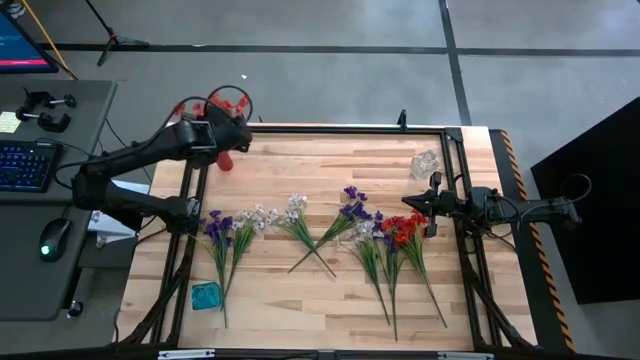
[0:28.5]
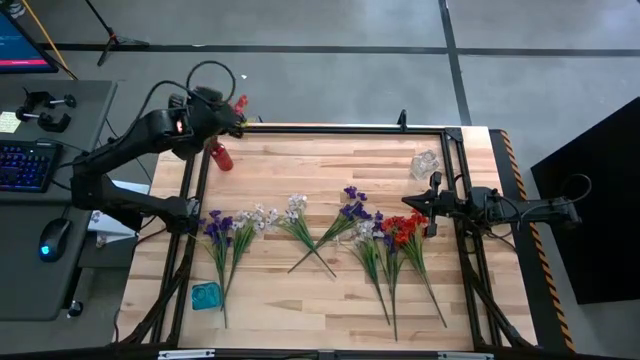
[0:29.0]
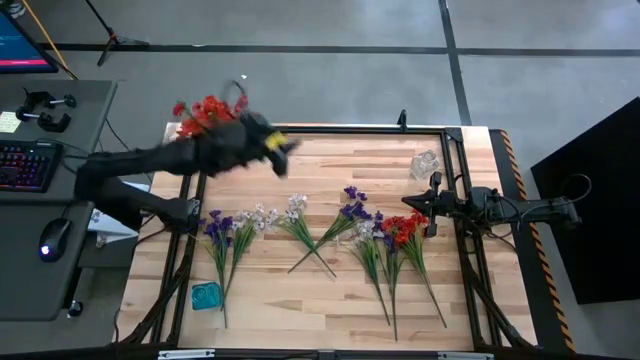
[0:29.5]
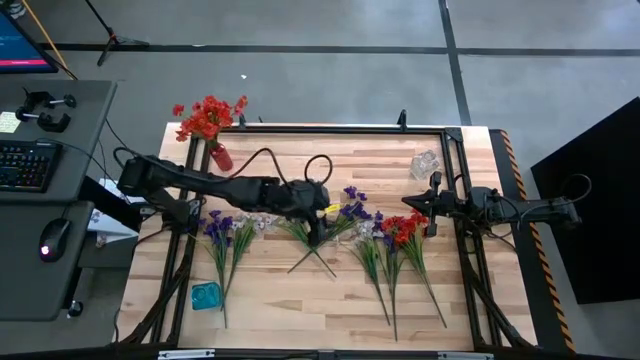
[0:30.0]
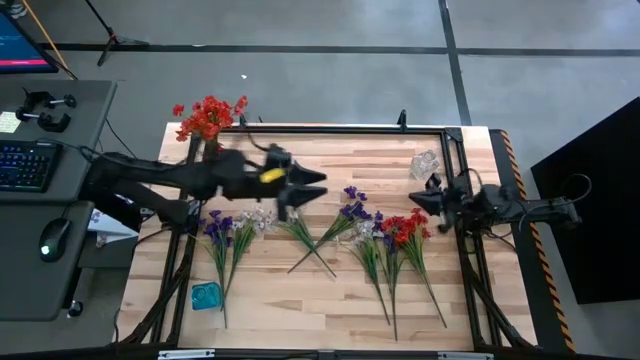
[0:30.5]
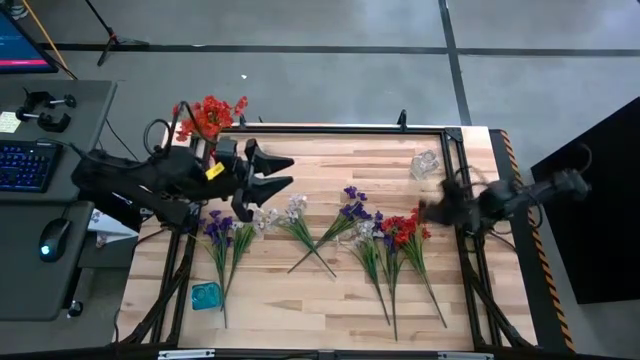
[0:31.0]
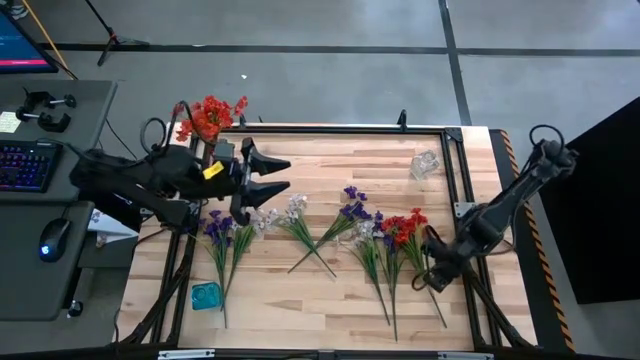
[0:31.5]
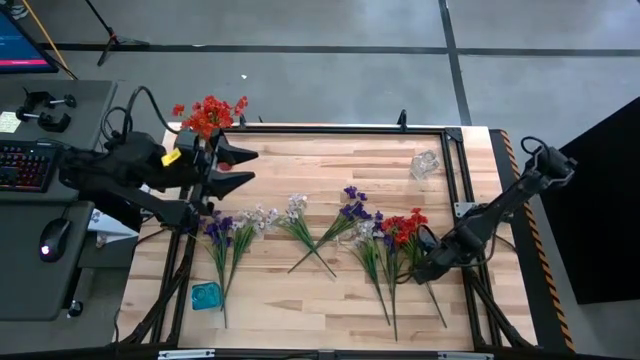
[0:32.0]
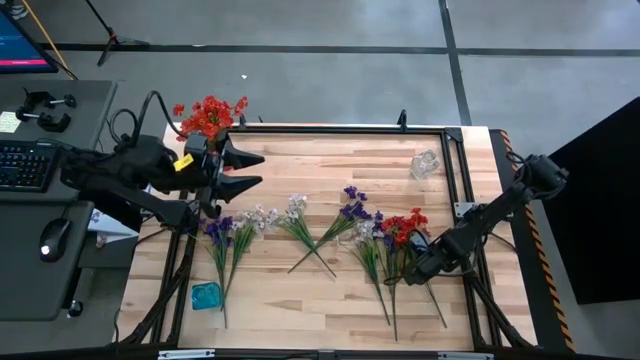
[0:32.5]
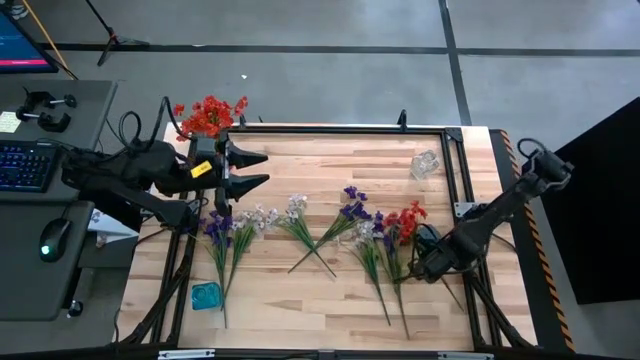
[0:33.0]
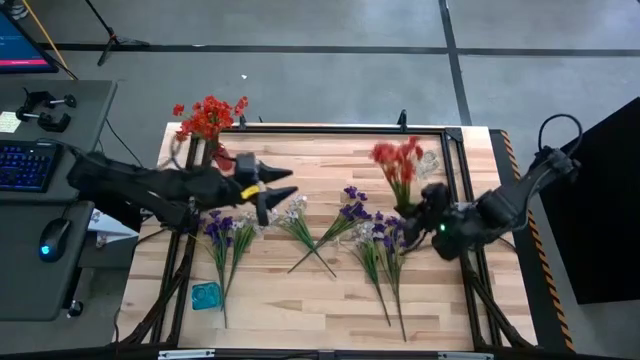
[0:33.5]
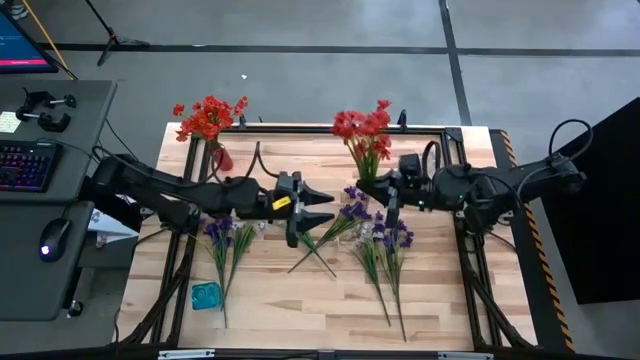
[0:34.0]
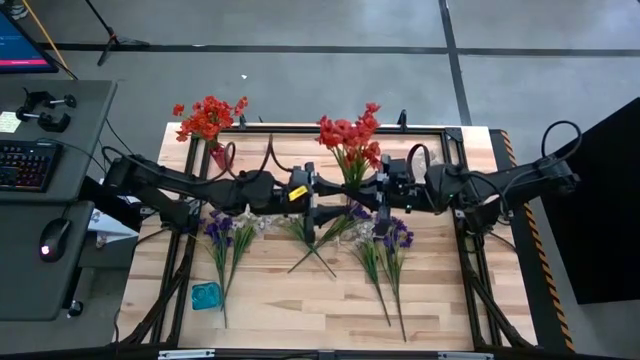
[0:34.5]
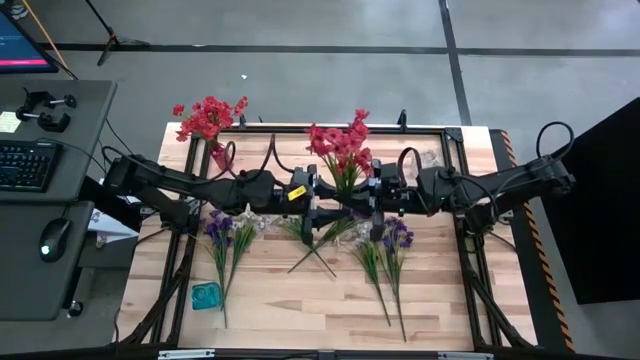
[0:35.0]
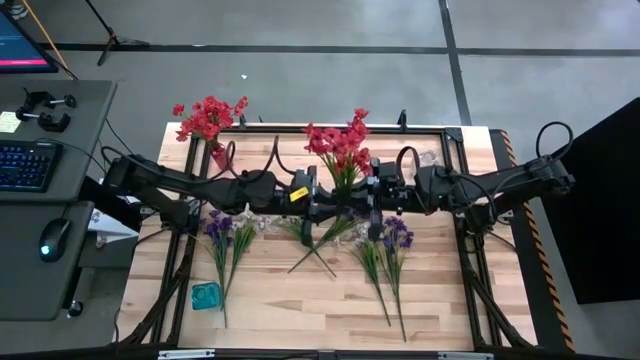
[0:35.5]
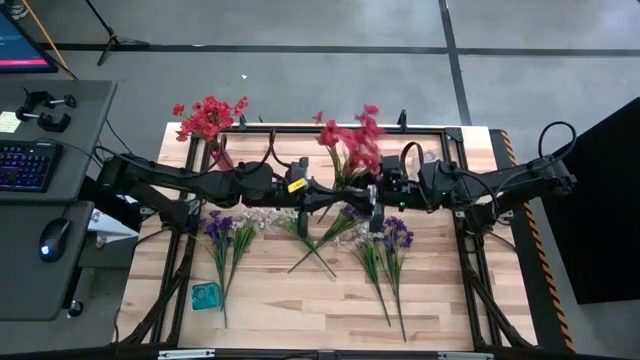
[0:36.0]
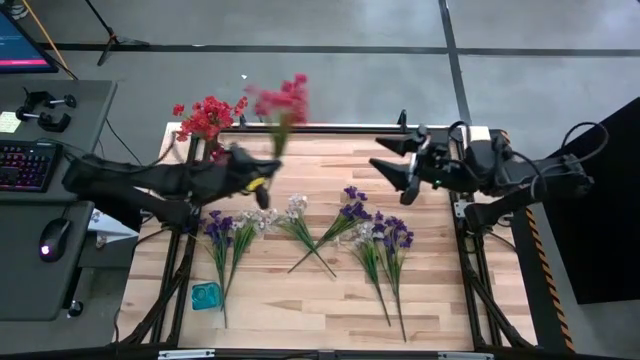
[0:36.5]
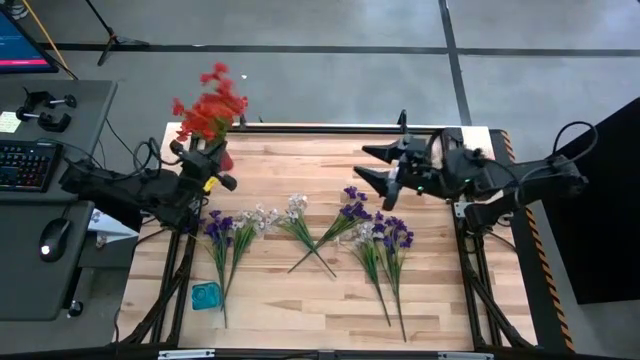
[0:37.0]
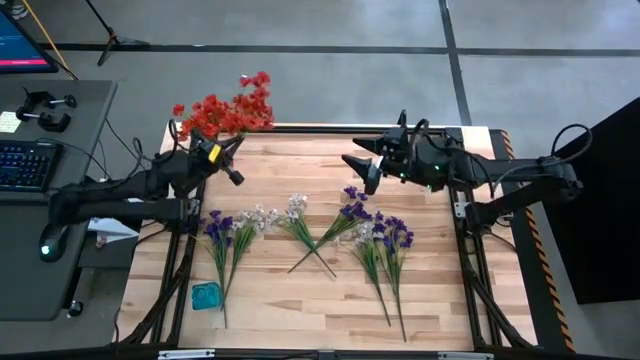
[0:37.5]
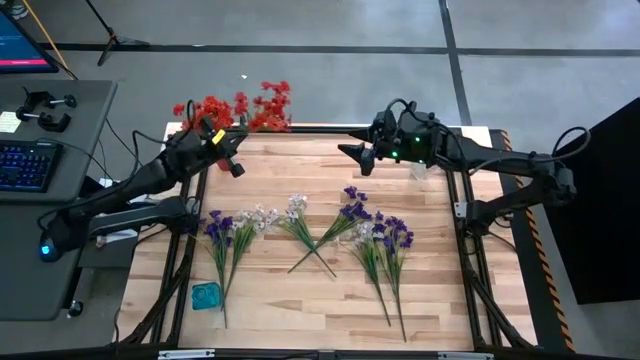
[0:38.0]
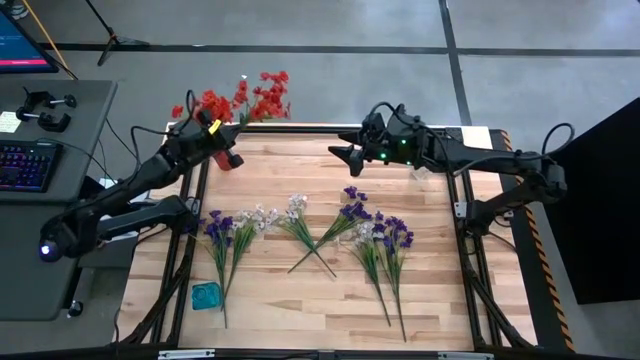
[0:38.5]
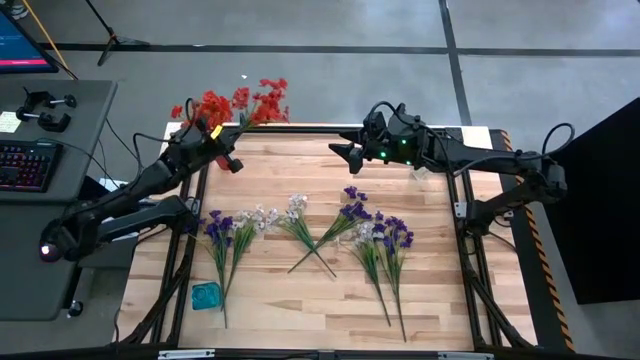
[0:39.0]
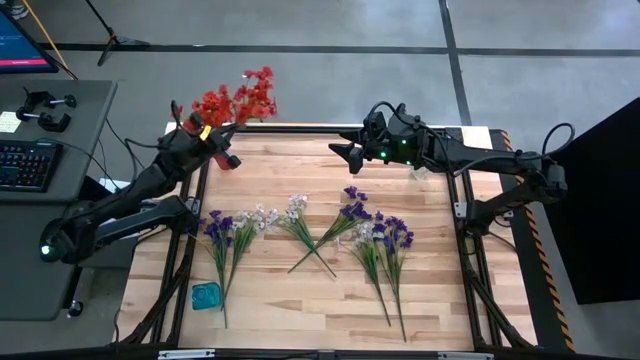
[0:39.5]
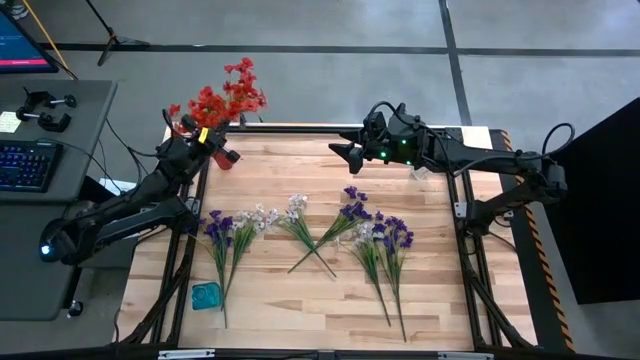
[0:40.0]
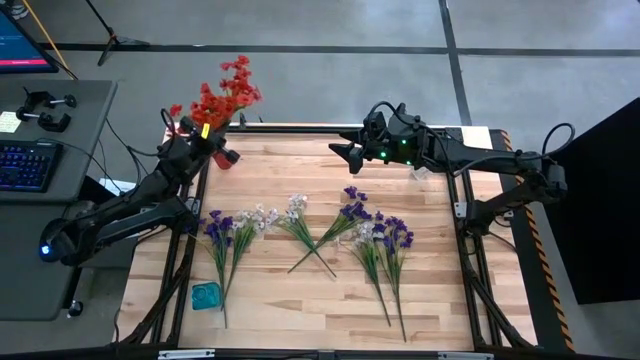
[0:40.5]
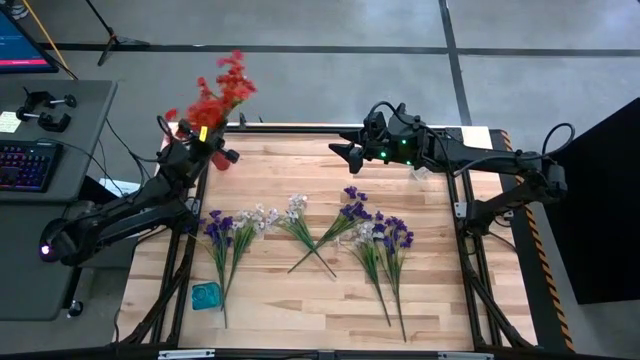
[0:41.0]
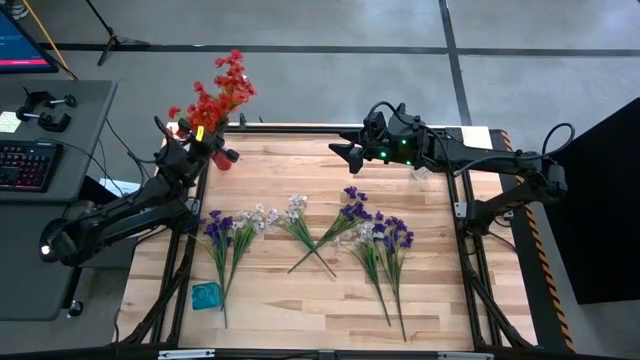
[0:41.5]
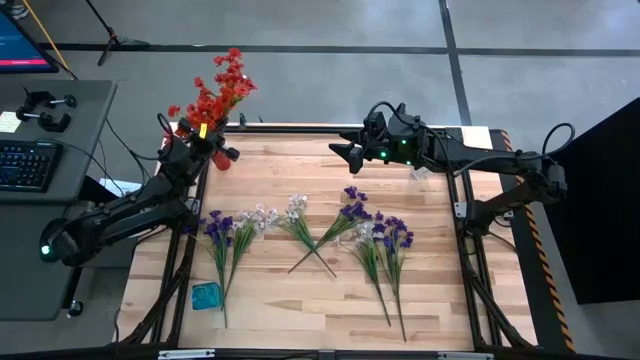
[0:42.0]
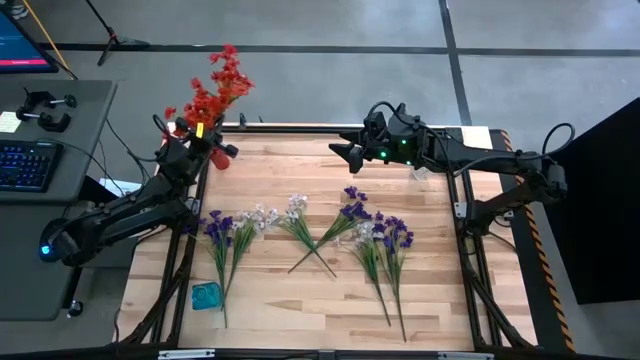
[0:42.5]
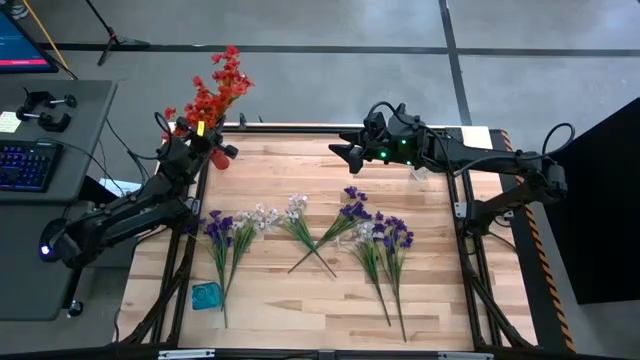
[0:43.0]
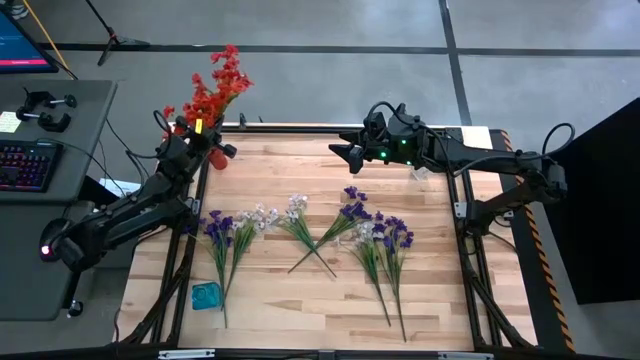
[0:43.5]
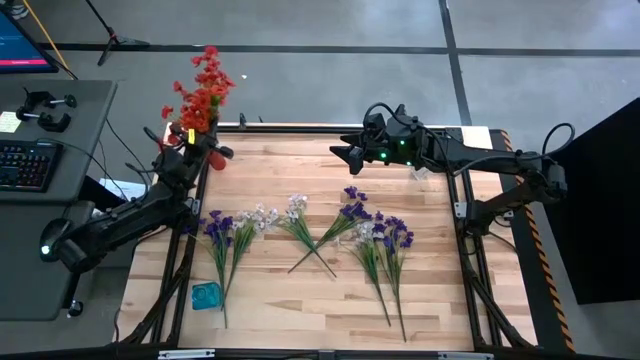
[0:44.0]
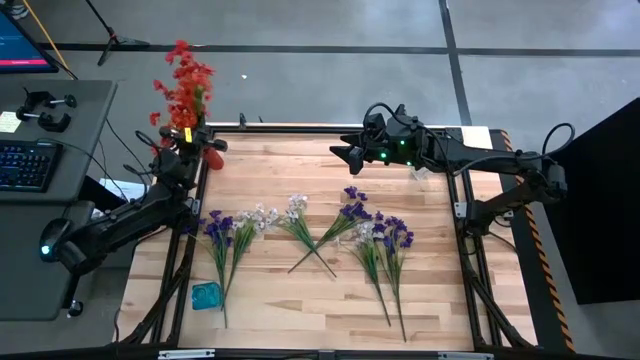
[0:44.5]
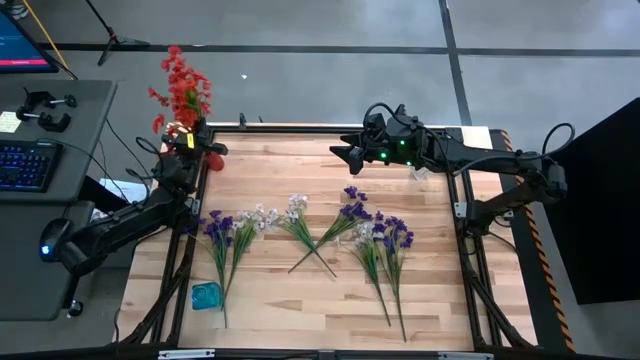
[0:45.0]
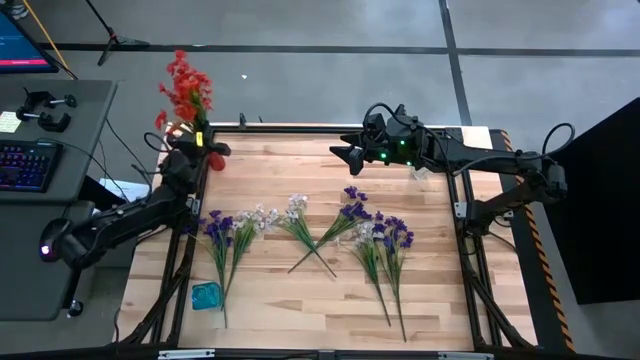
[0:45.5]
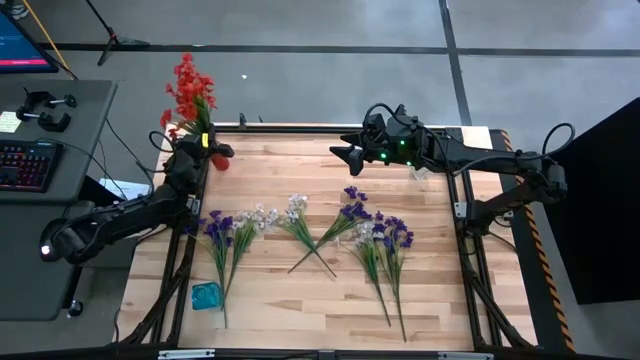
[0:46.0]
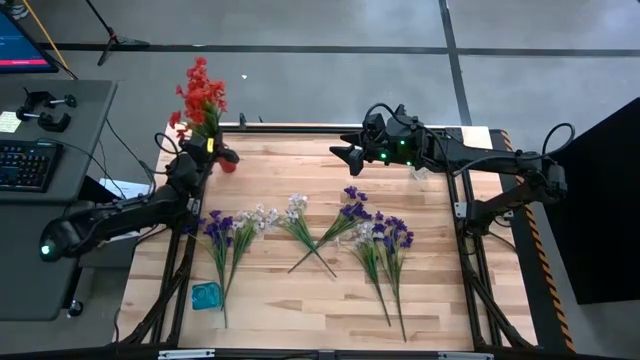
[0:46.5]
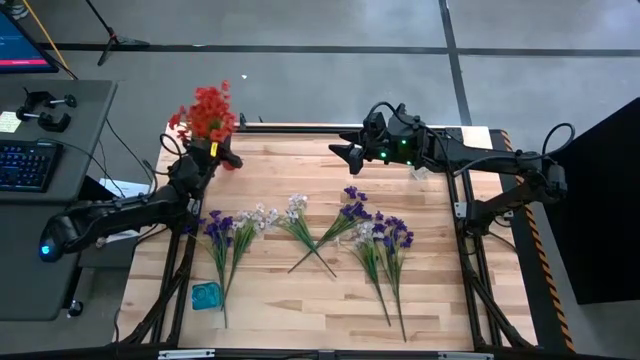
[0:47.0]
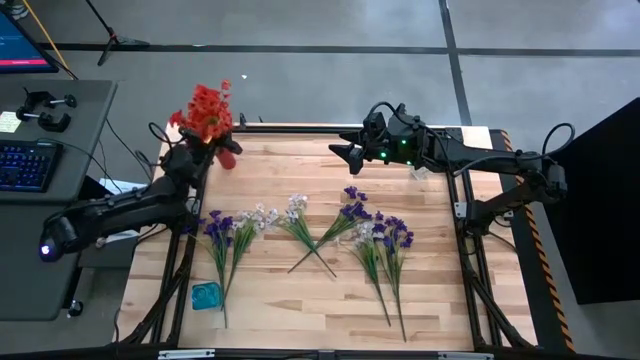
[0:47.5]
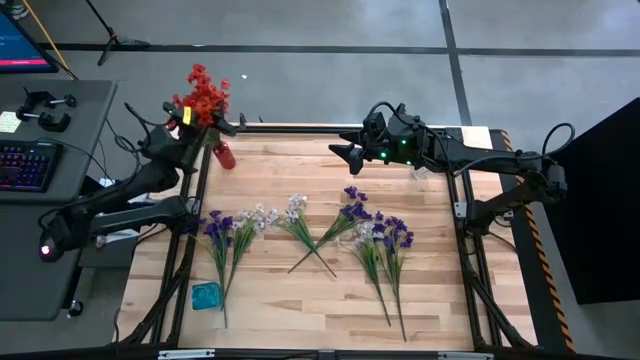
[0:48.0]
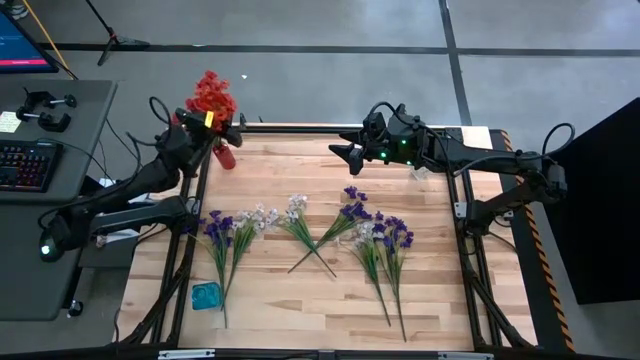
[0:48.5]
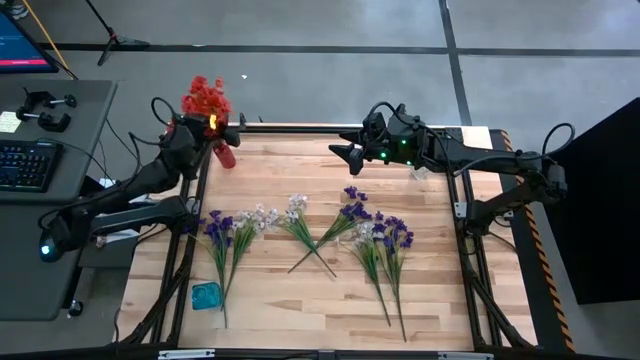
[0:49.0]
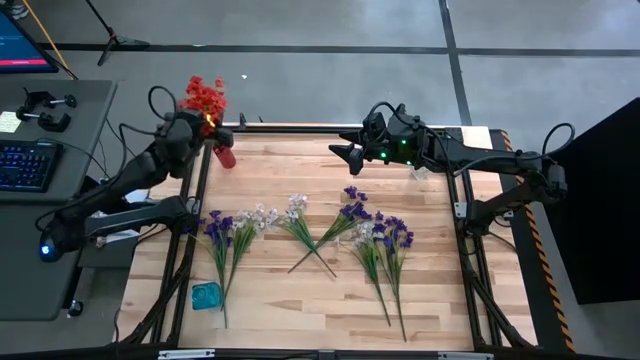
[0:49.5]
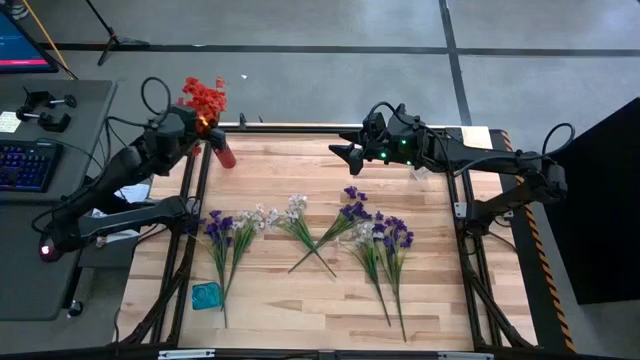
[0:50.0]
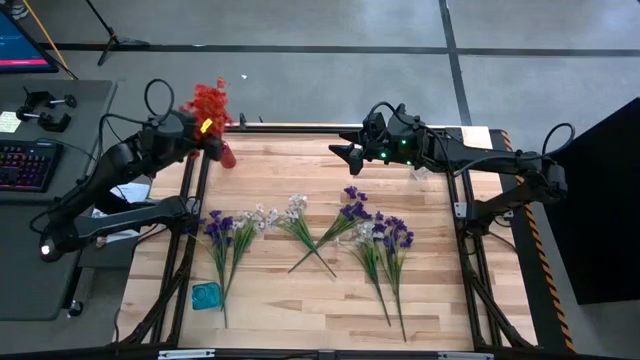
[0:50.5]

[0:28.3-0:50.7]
Task: Sort flowers into vase by color
Put the red flowers into the red vase
